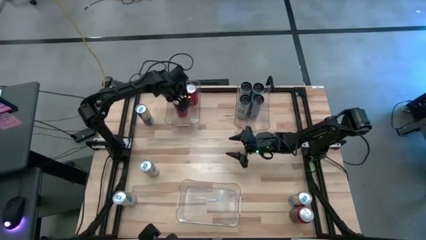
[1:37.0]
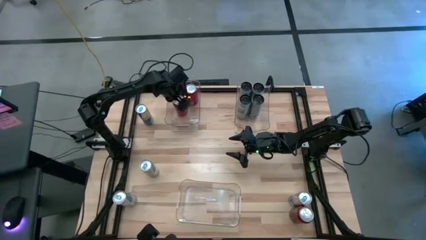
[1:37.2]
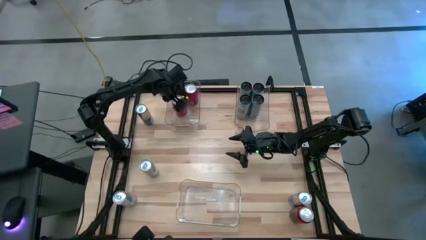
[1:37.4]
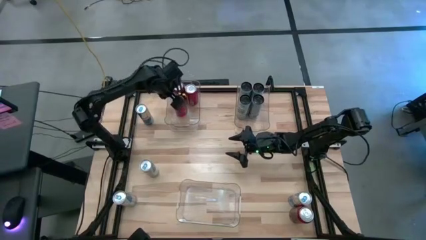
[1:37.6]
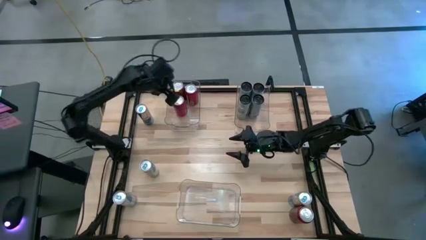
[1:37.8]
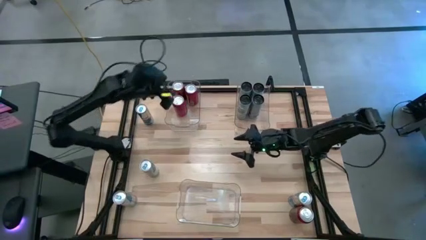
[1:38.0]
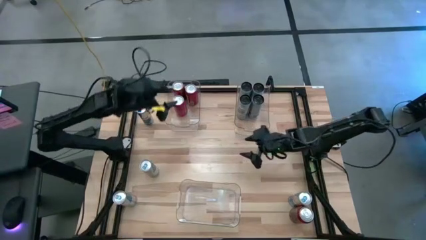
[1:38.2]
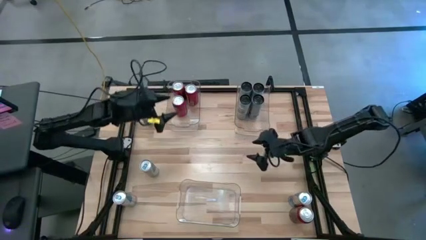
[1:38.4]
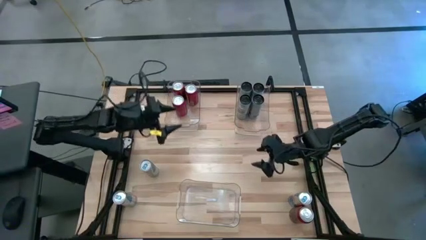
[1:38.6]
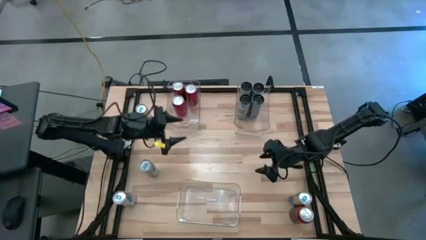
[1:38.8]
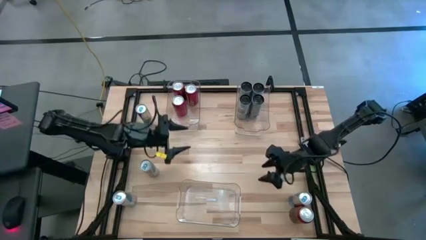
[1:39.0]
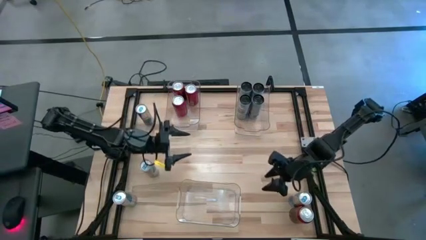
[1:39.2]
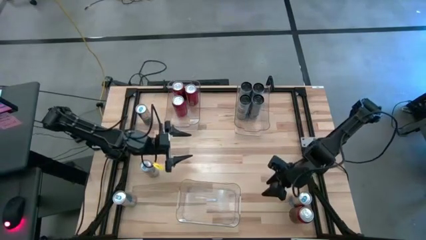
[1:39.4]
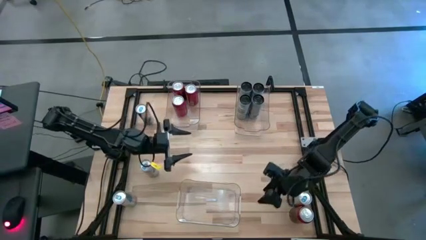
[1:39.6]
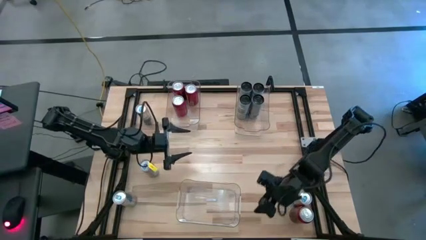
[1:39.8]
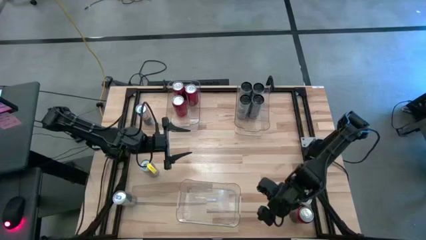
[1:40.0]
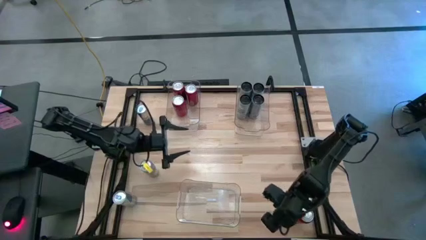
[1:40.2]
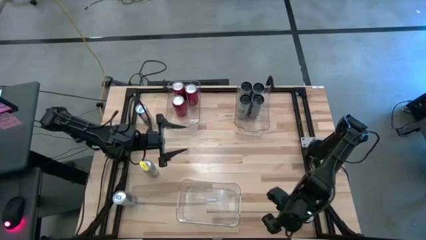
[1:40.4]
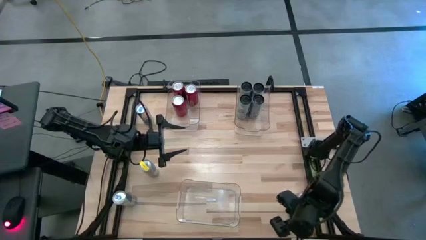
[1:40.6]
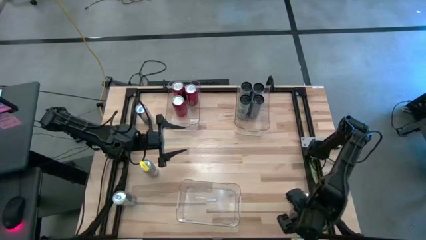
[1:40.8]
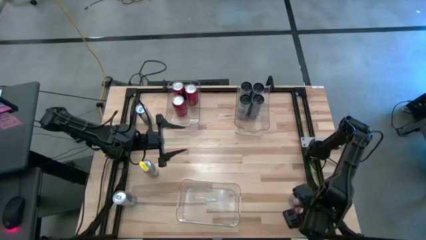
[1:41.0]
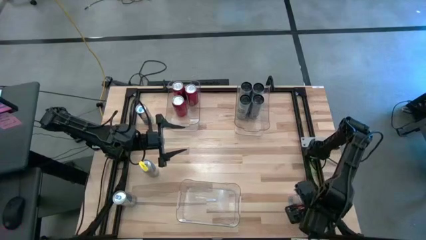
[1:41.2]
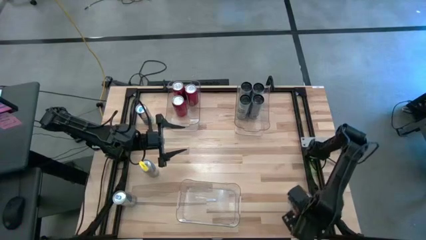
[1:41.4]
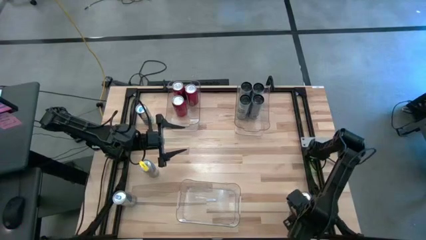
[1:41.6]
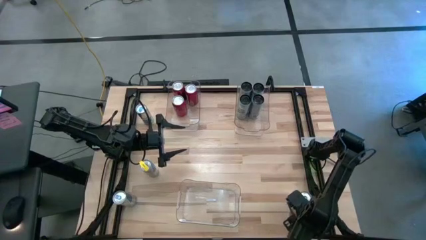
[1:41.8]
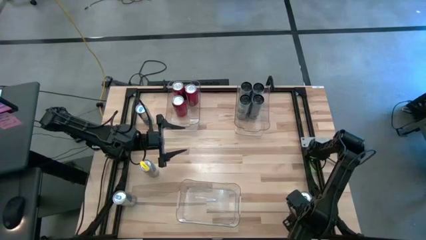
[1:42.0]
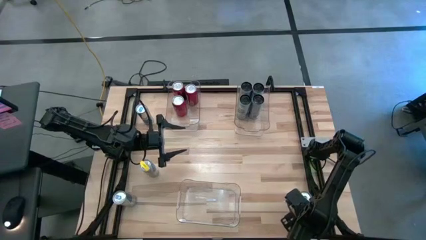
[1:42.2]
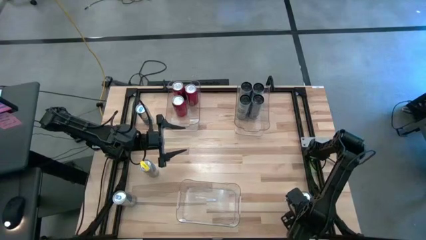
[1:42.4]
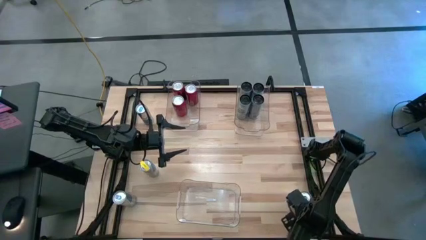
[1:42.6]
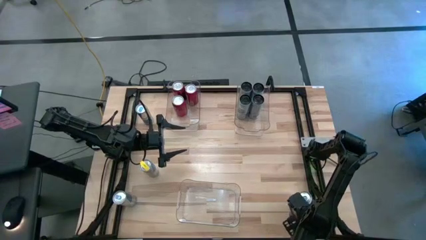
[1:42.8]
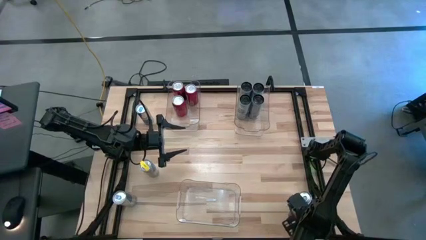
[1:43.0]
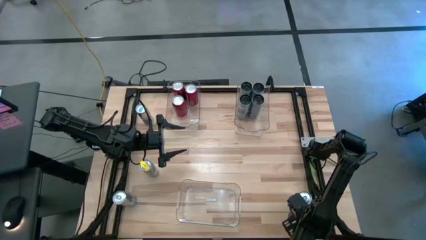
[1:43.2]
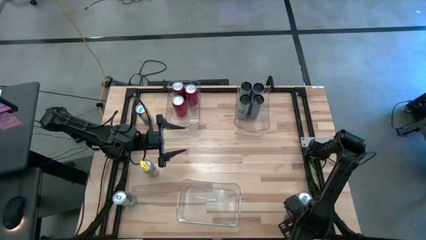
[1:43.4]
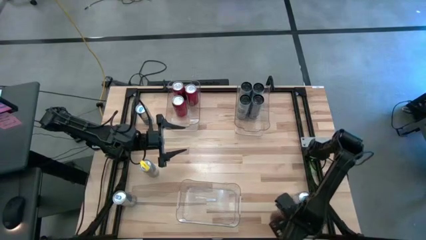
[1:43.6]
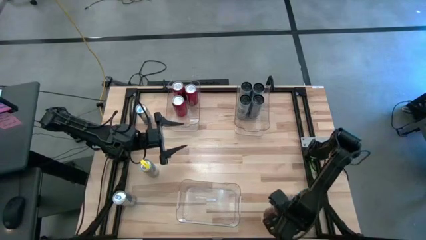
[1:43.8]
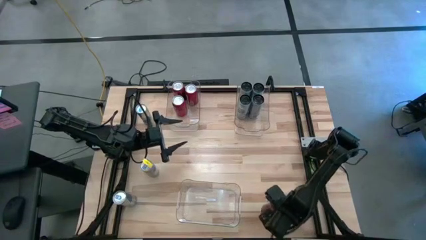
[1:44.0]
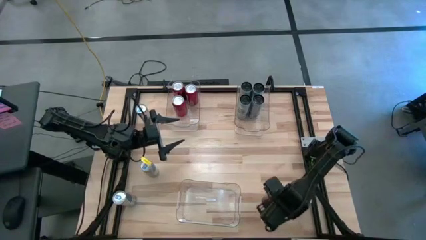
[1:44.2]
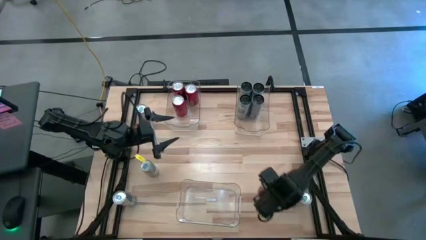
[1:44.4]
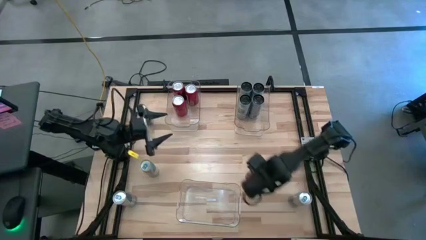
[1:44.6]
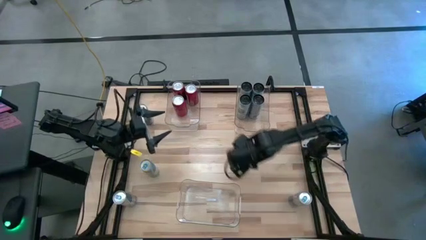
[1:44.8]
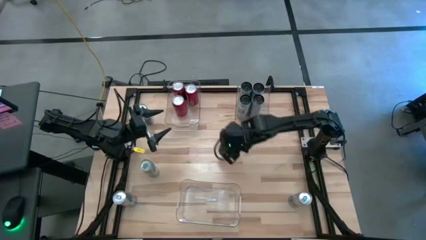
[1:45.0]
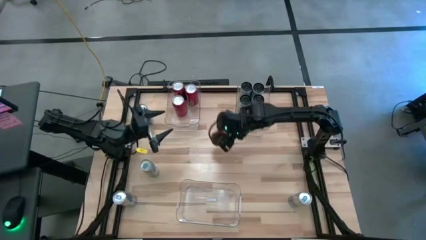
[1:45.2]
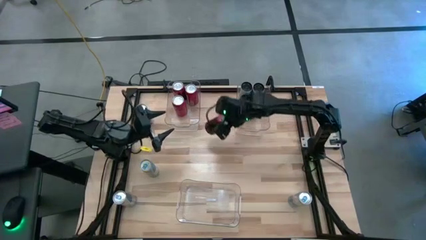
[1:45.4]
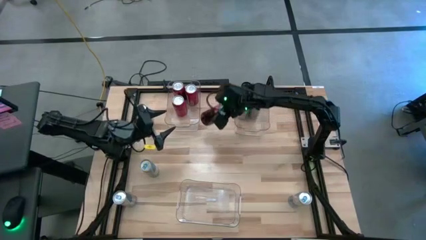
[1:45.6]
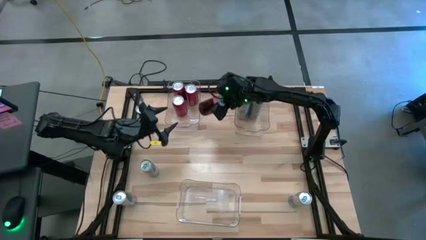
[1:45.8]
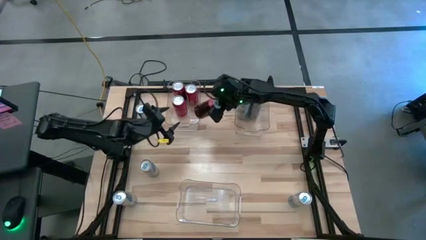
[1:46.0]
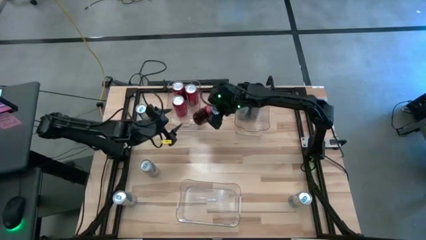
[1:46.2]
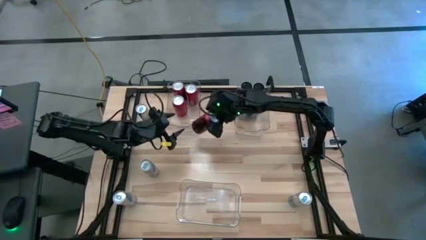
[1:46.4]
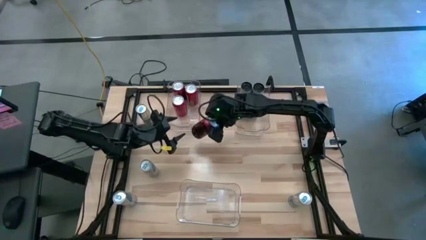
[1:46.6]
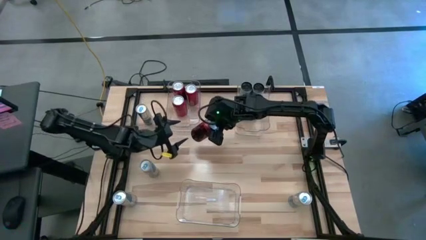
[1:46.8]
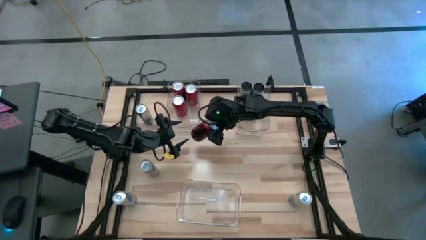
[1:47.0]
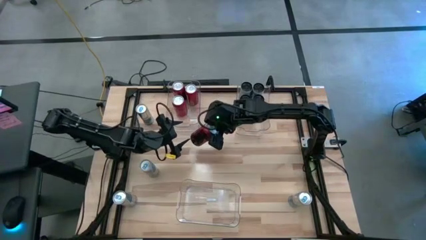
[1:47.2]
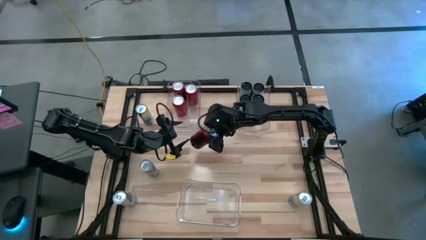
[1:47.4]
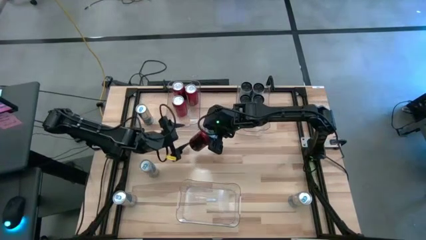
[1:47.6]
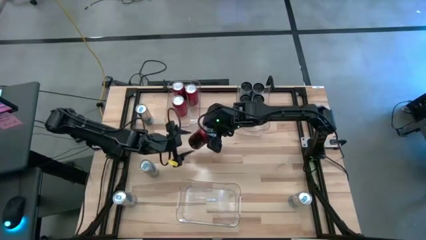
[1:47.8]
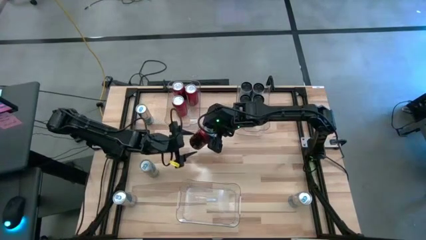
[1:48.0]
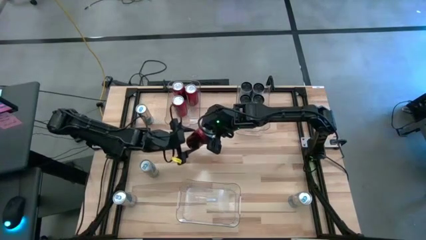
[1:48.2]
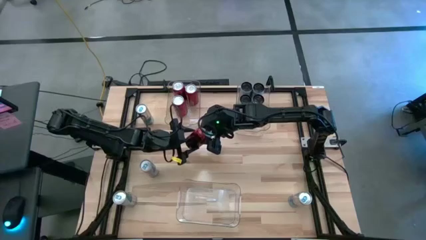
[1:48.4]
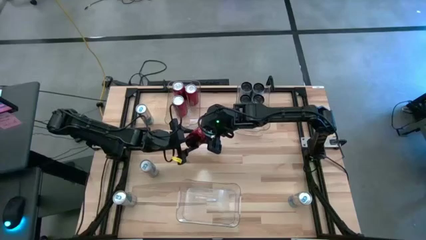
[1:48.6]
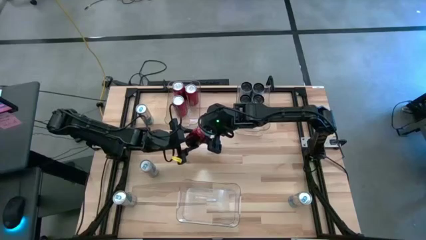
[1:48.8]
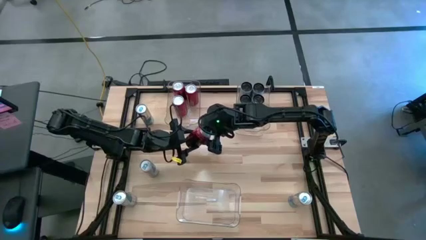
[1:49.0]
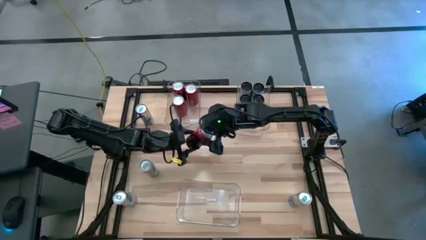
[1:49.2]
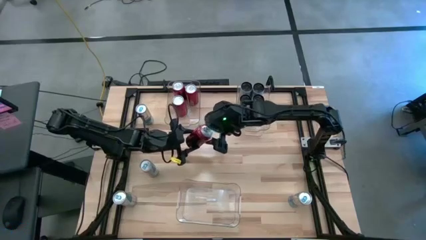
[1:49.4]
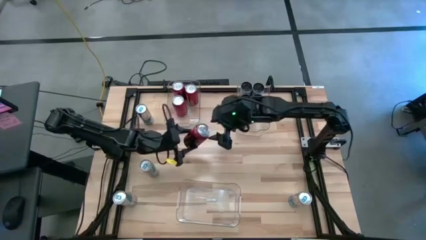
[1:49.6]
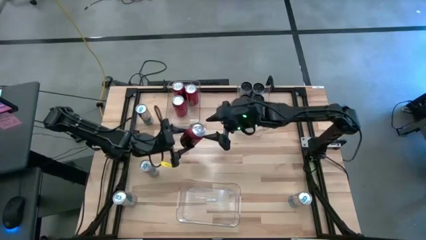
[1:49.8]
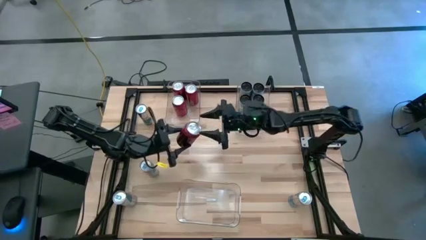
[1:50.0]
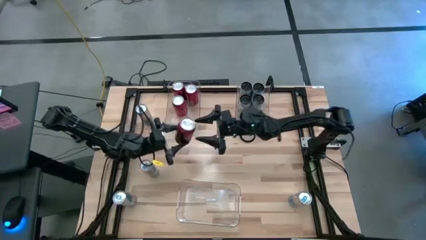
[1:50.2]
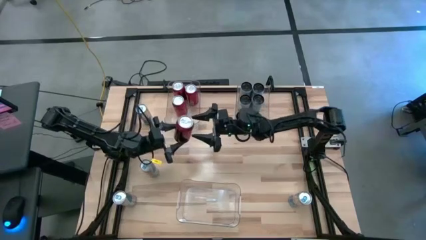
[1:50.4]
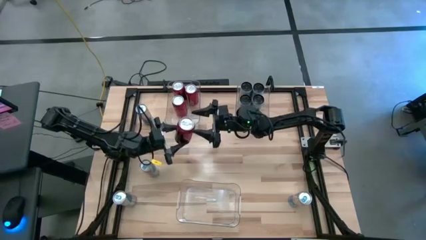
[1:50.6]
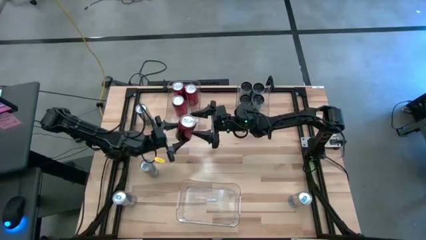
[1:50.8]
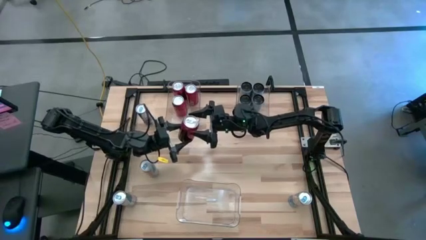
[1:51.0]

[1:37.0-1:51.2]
Task: Sort soda cans
Put the red soda can into the top left transparent bin
